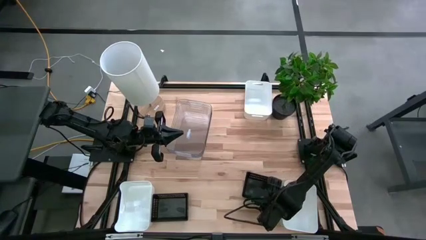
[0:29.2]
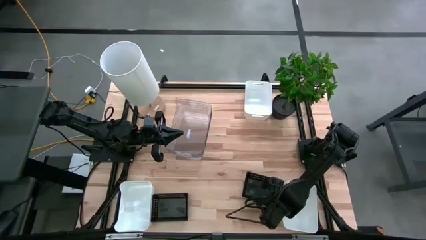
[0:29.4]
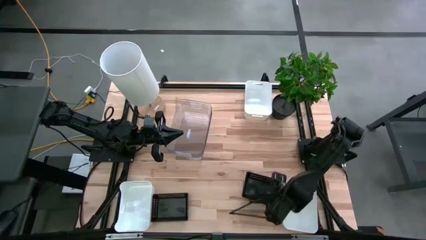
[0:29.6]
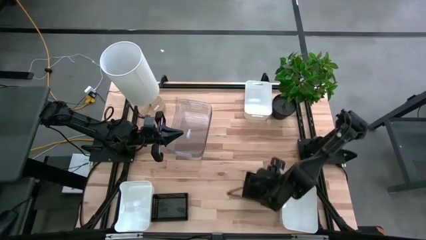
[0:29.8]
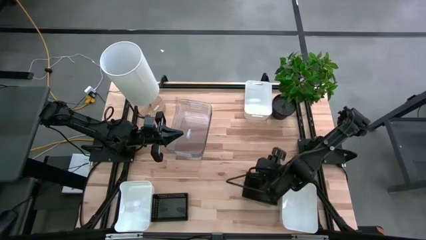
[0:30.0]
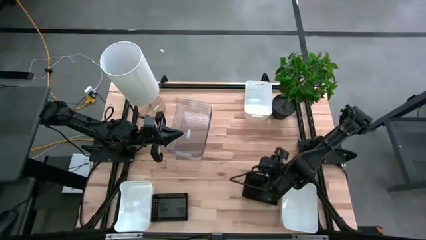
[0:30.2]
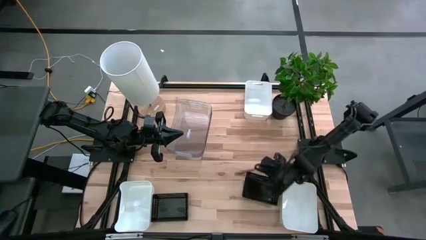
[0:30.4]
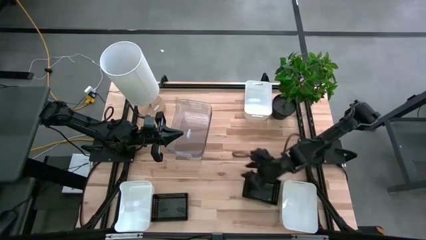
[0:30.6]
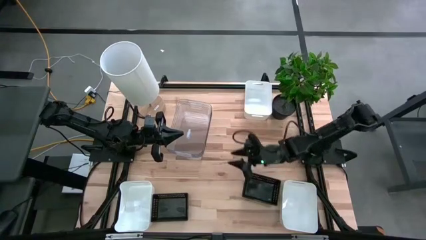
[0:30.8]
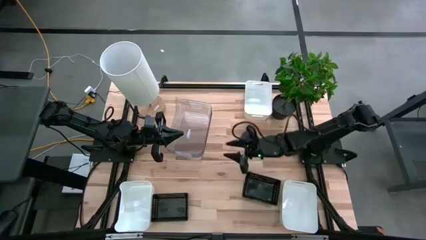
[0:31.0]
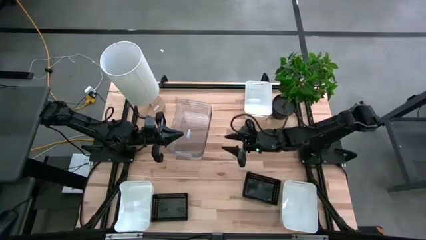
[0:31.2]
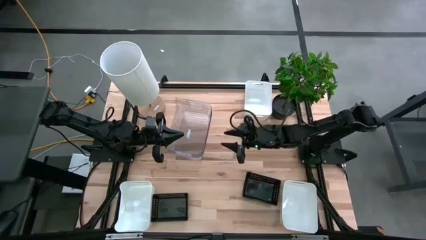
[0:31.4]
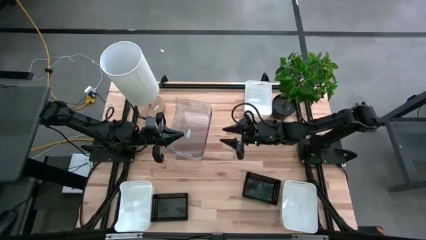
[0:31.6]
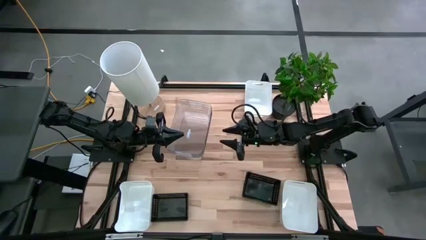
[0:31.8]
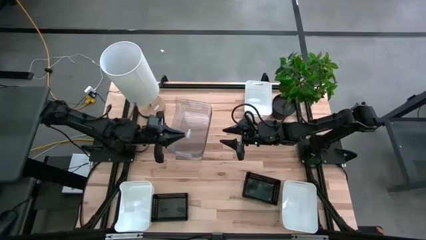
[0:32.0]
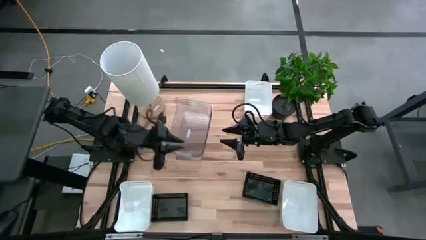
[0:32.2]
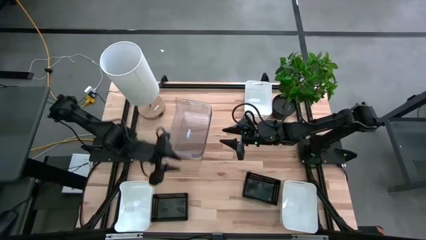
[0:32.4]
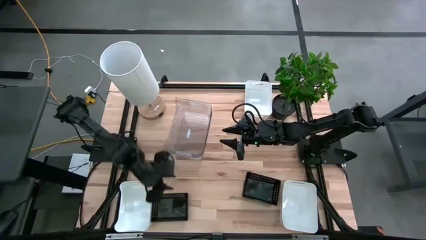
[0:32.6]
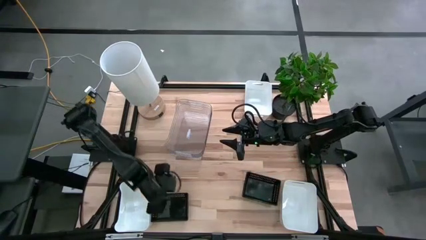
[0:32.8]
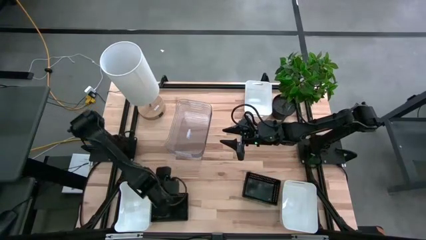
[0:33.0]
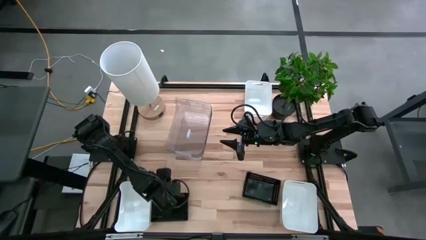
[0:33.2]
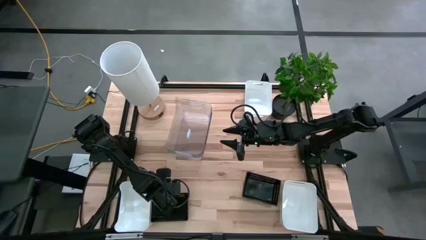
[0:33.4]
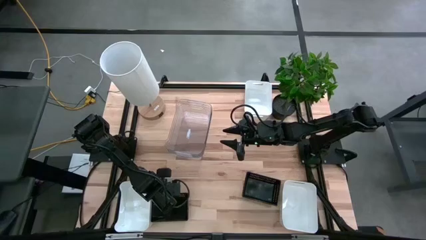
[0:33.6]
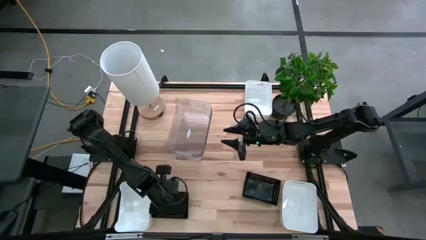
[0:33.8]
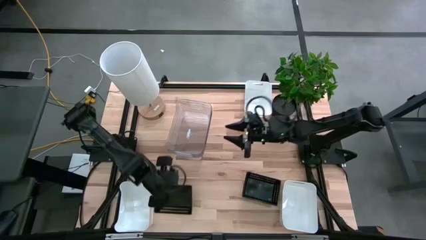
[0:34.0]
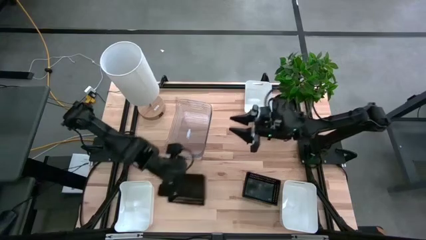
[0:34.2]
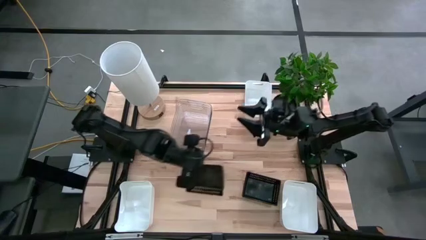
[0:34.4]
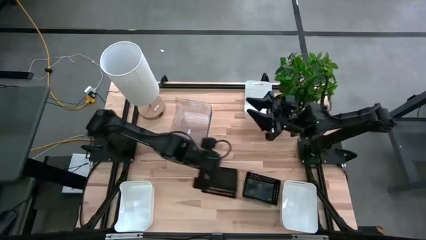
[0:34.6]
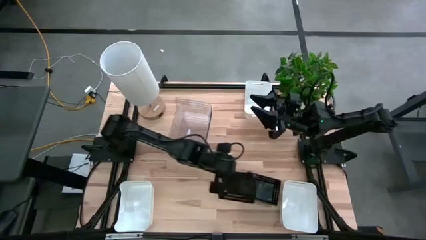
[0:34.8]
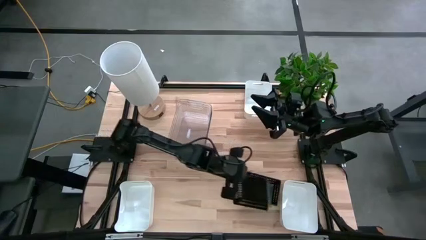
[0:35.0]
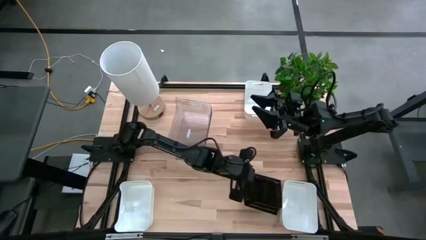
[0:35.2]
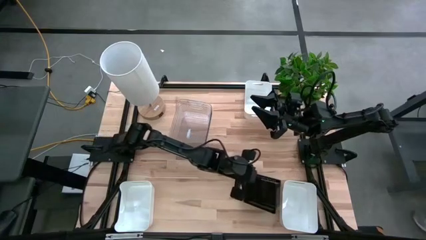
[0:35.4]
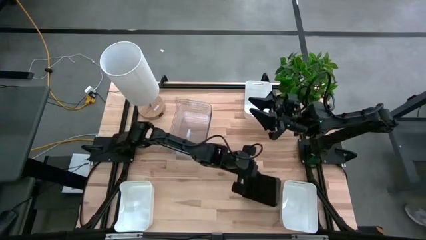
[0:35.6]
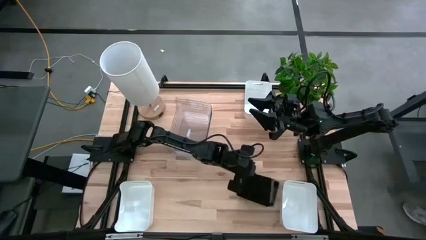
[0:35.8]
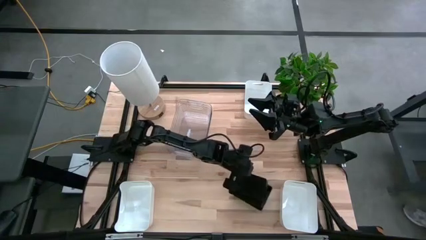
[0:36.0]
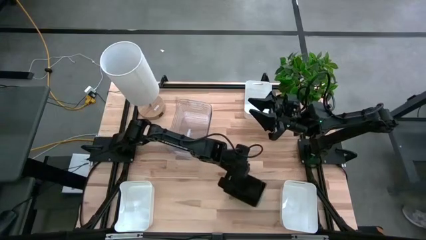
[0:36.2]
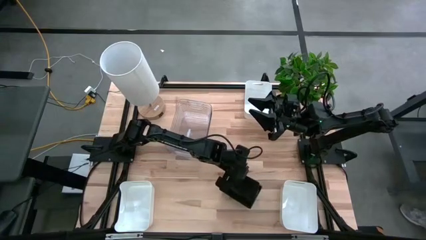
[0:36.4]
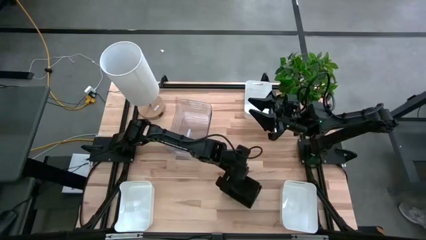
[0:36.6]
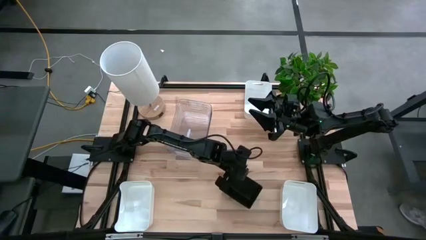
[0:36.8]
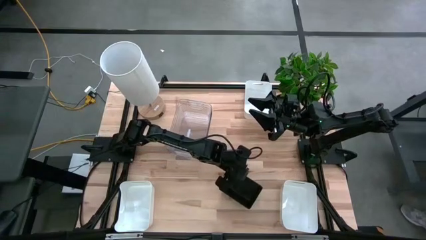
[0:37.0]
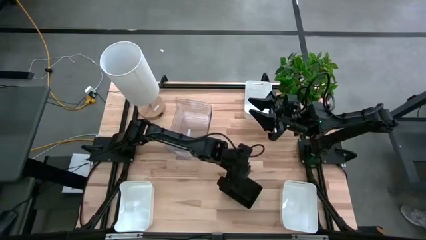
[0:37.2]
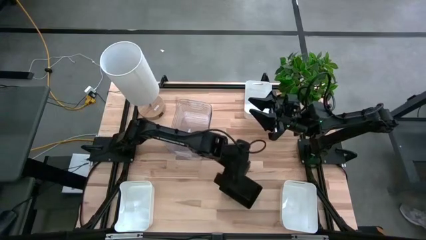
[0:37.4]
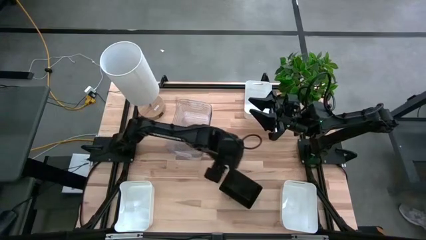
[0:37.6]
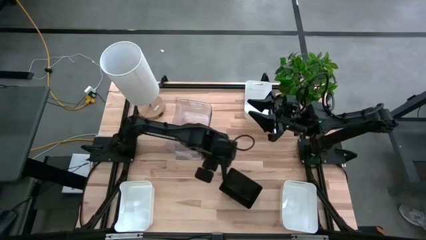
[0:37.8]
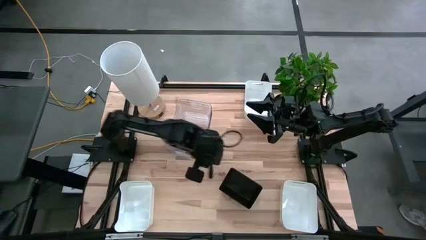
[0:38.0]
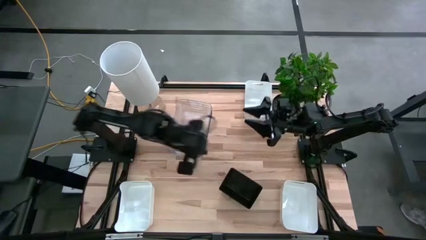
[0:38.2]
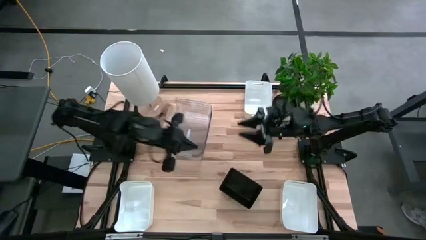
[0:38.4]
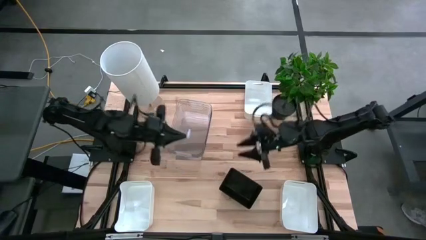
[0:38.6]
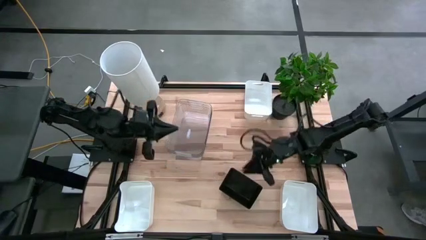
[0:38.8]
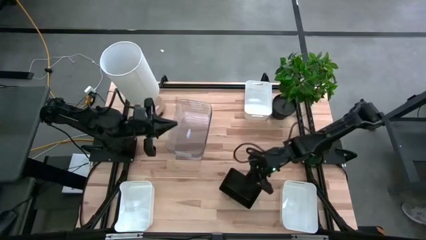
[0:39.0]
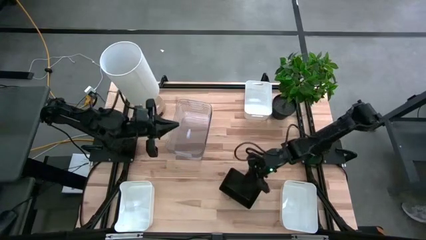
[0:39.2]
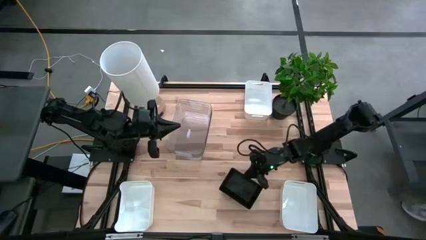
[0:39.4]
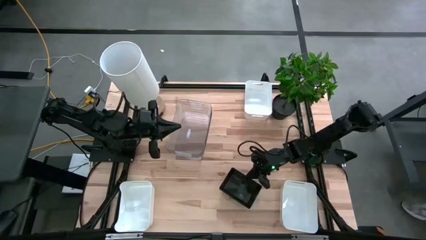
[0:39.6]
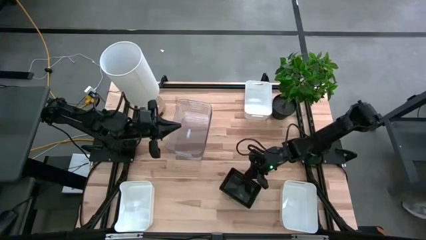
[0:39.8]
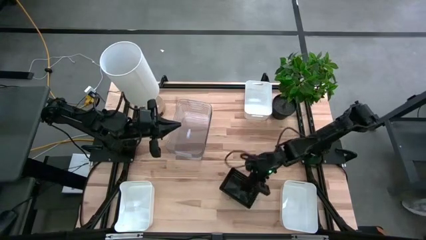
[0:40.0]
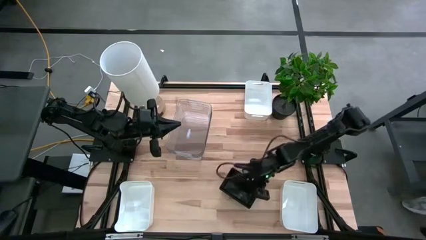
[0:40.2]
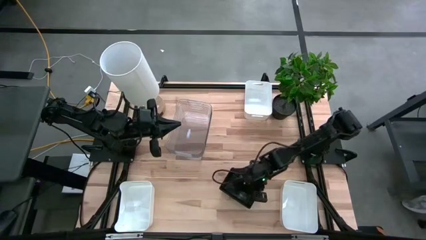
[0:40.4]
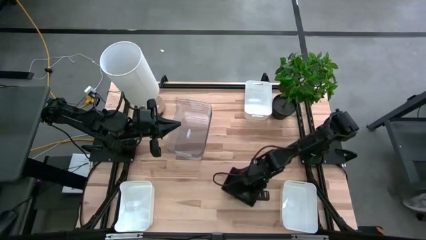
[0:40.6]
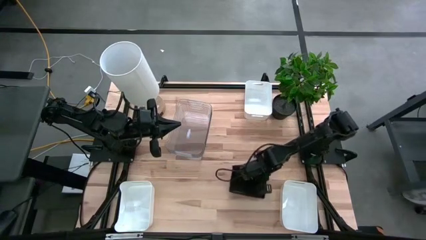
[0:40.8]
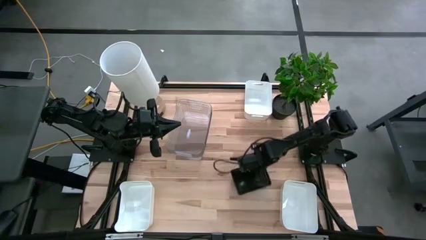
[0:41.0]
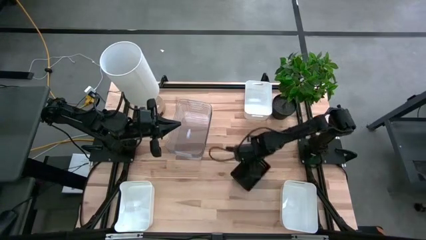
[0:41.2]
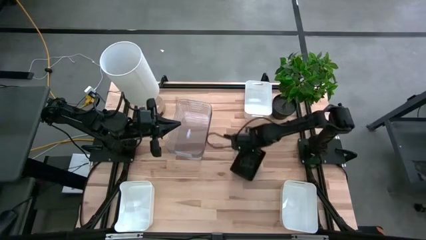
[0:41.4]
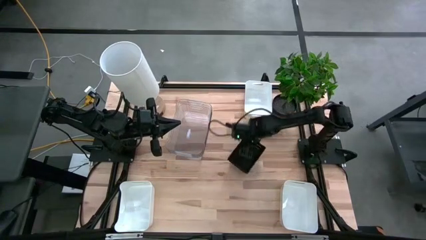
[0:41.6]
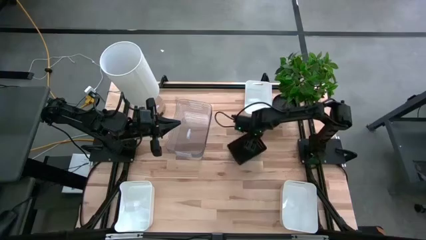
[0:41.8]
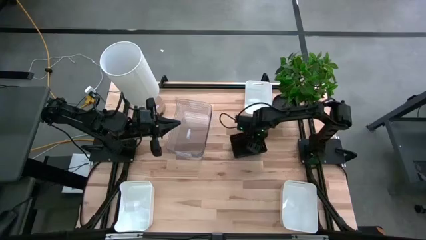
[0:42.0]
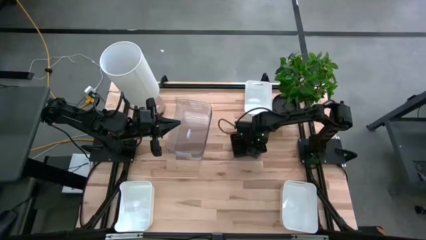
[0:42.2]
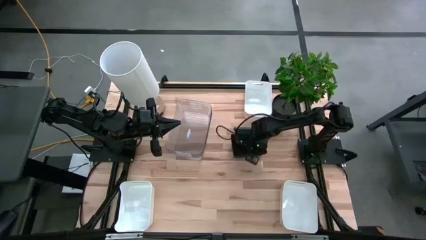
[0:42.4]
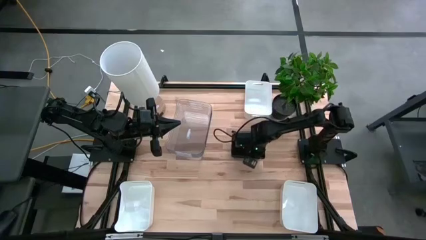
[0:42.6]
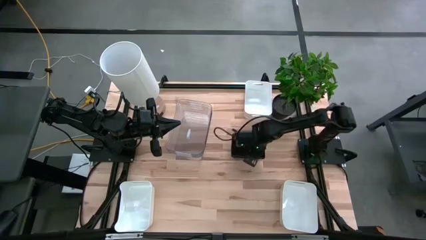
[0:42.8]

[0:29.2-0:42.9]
Stack the left black bin on top of the right black bin

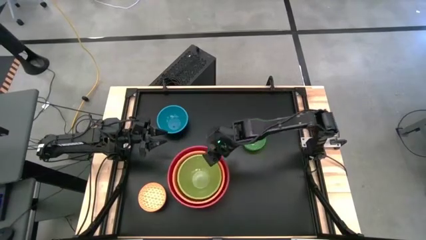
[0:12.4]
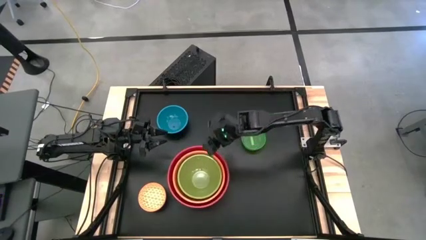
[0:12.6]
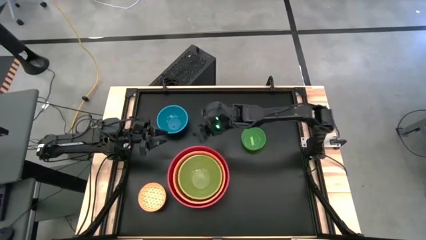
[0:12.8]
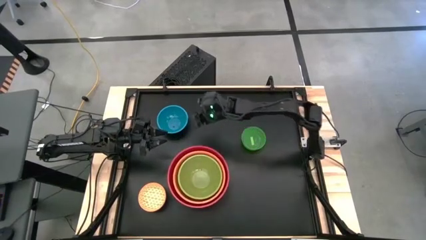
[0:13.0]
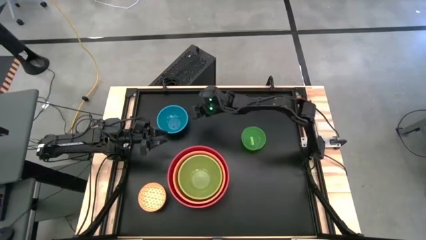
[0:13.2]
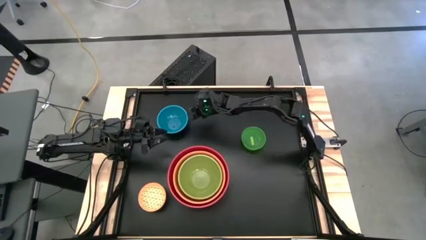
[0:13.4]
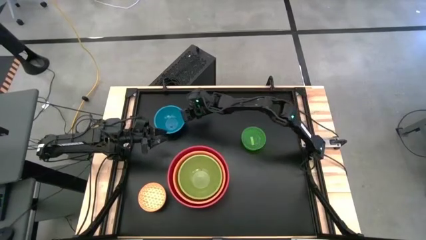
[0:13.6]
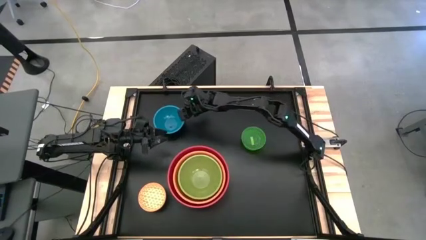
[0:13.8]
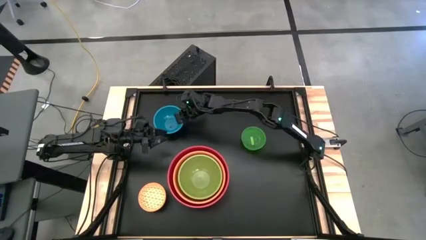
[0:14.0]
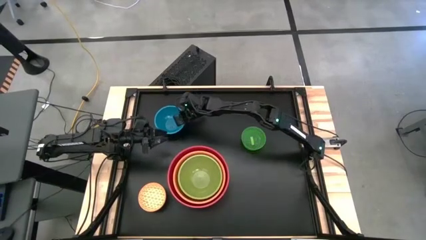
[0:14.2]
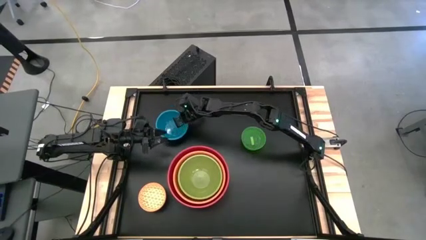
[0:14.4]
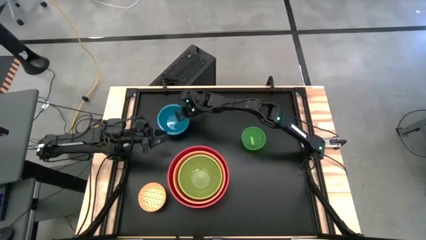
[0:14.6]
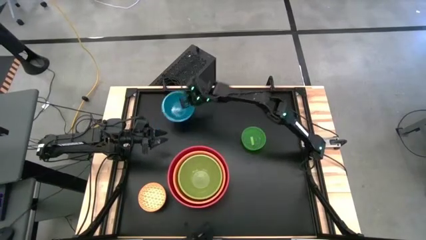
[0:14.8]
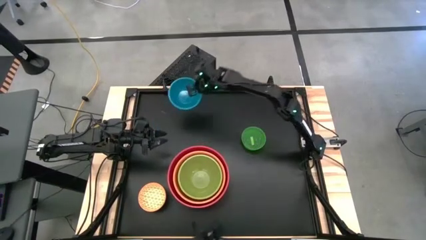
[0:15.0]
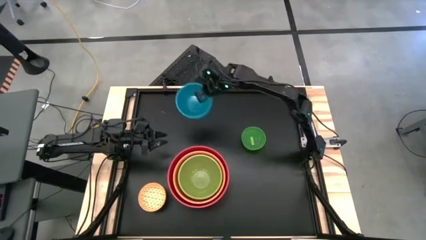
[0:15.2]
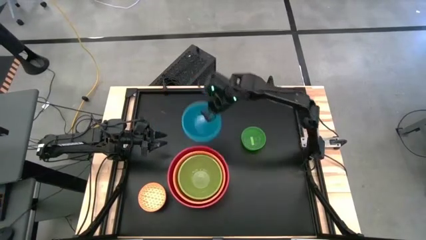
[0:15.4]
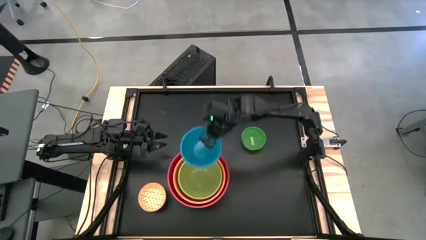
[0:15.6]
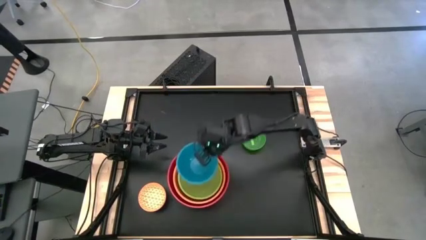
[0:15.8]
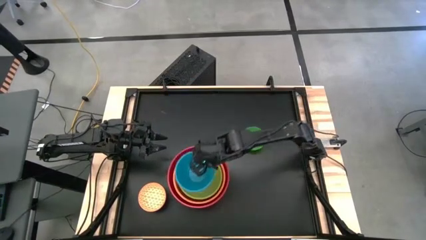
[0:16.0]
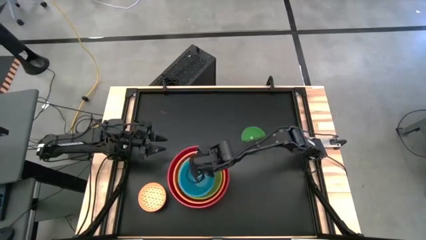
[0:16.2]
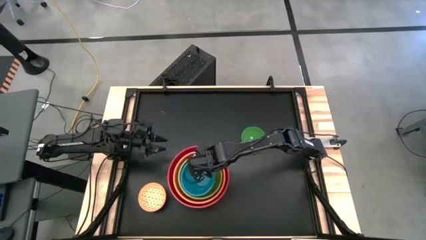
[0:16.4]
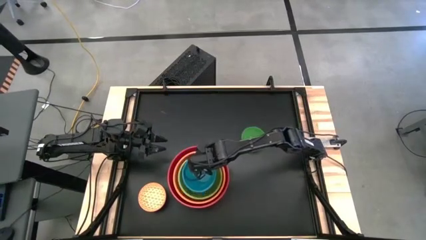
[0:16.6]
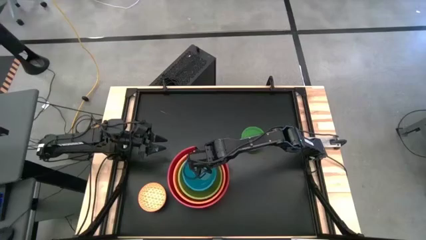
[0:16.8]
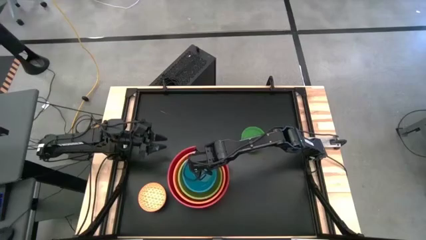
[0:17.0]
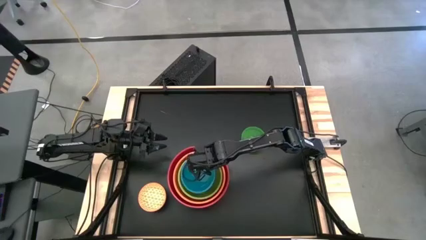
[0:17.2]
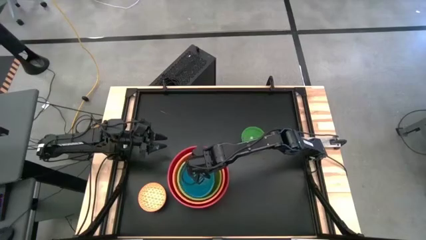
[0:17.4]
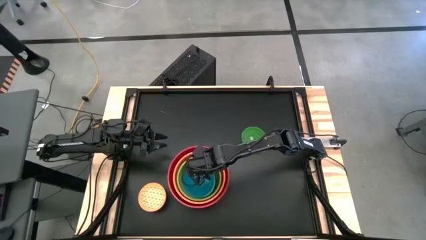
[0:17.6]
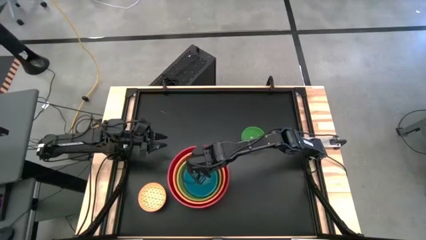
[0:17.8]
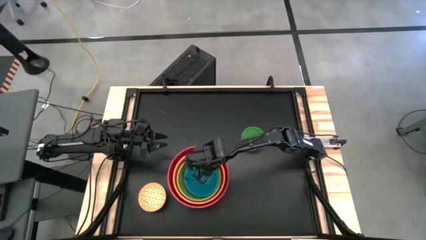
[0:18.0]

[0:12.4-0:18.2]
Stack the blue bowl on top of the green bowl
